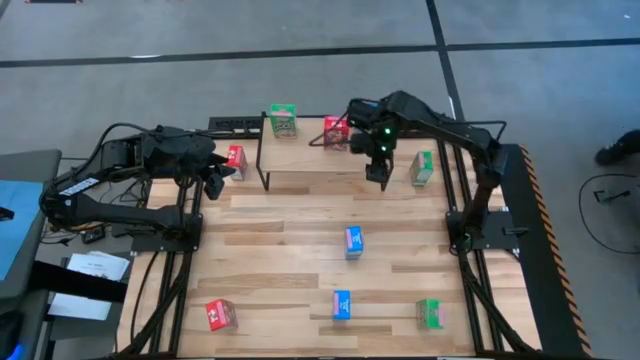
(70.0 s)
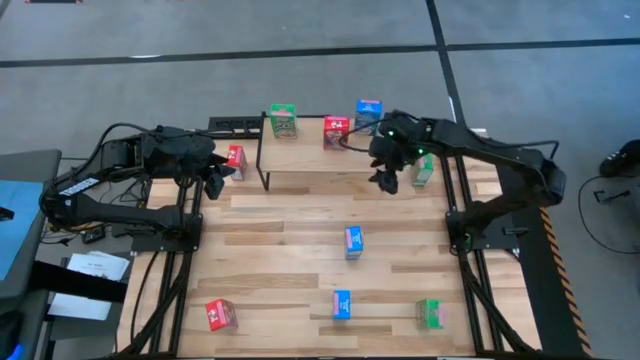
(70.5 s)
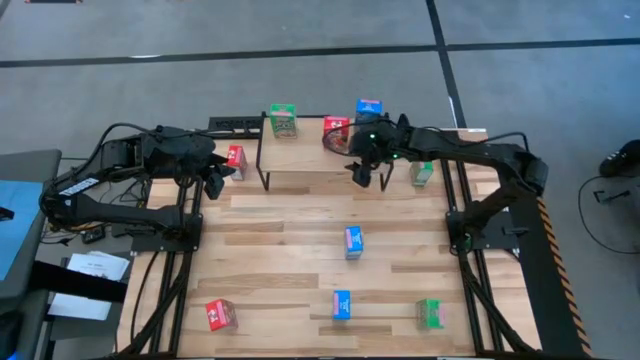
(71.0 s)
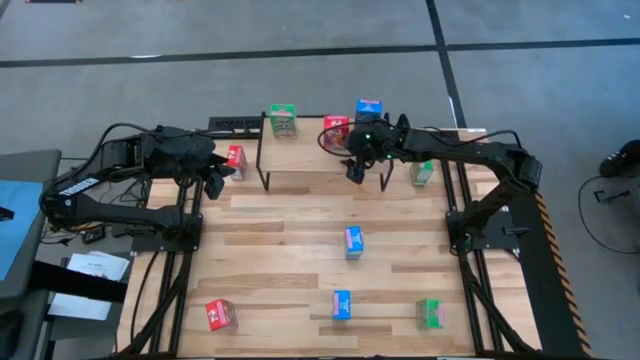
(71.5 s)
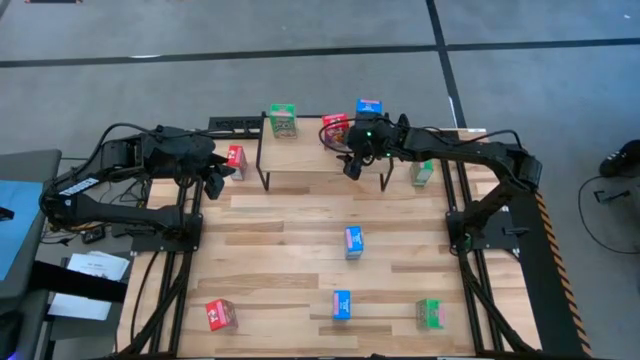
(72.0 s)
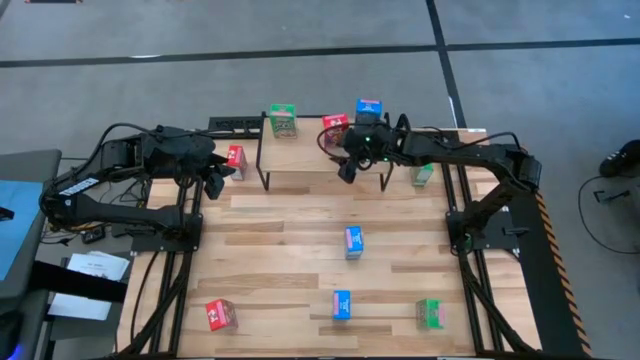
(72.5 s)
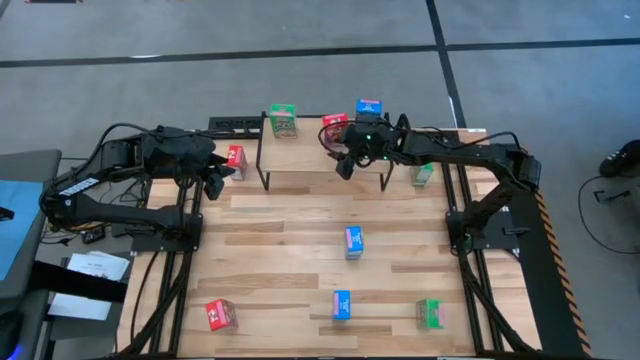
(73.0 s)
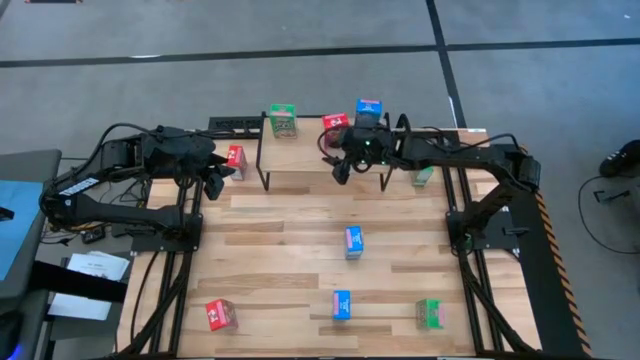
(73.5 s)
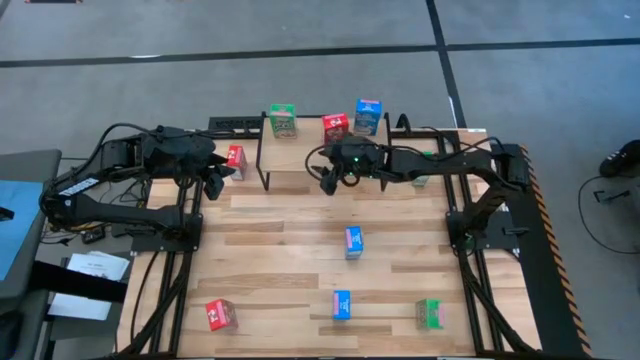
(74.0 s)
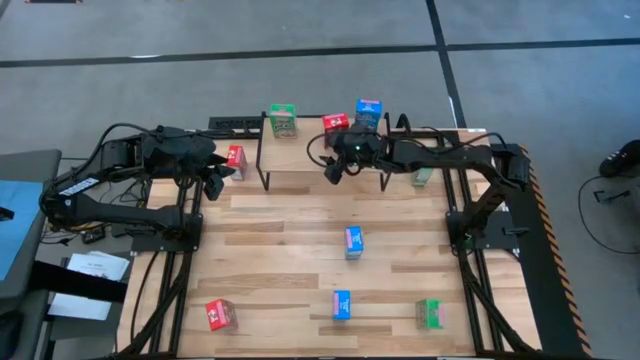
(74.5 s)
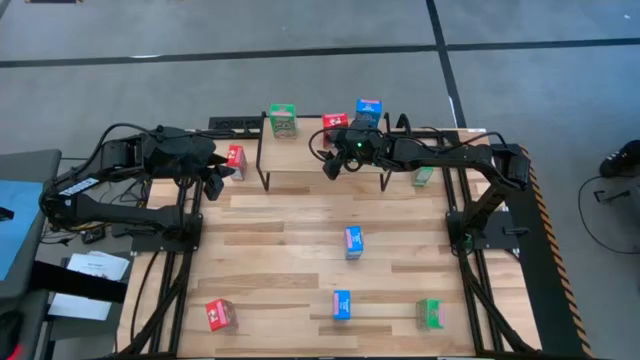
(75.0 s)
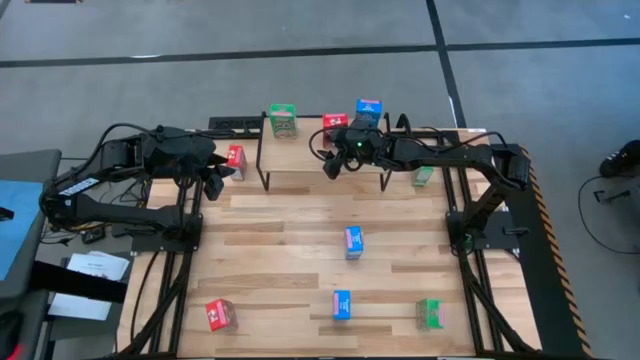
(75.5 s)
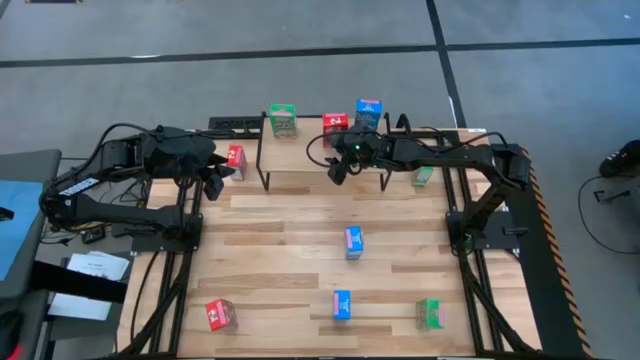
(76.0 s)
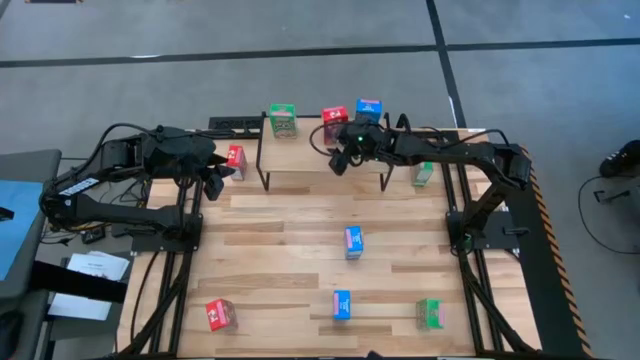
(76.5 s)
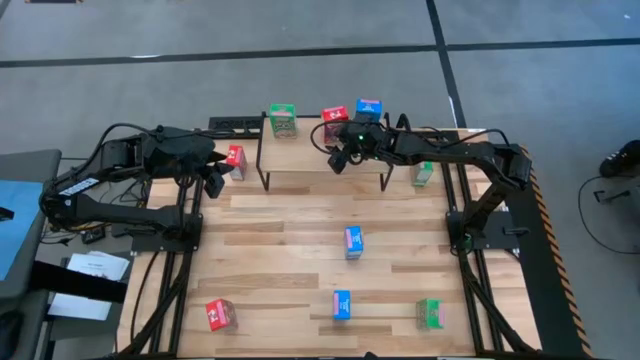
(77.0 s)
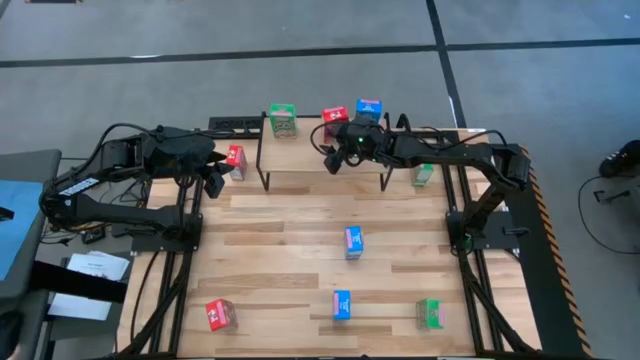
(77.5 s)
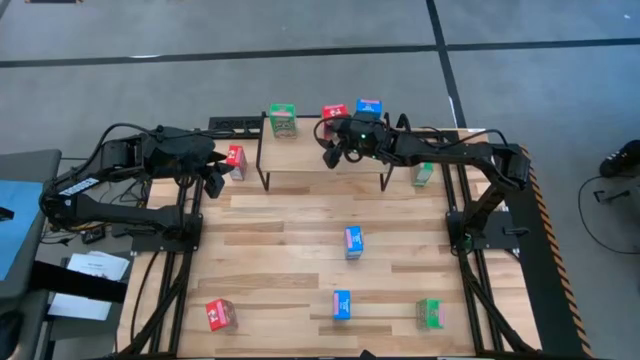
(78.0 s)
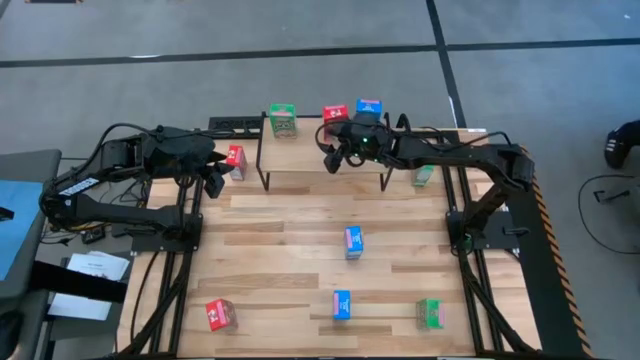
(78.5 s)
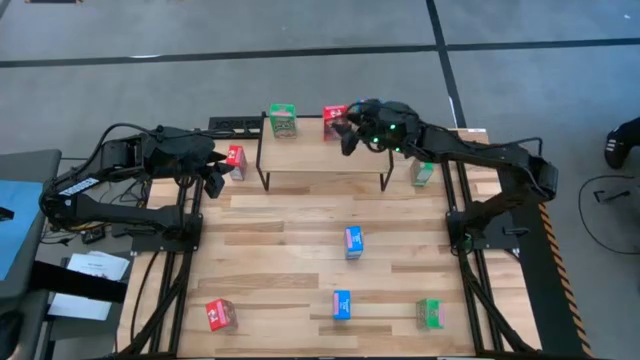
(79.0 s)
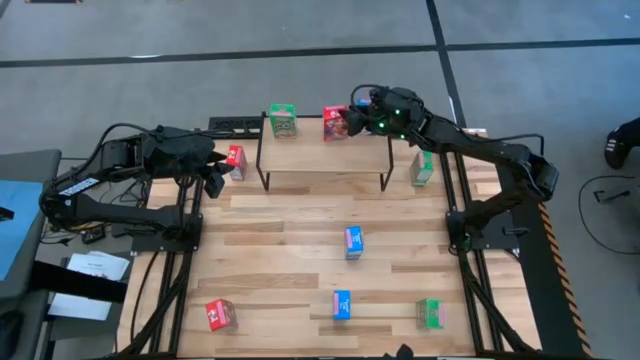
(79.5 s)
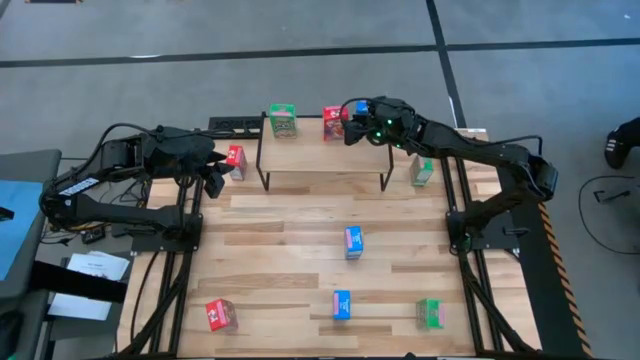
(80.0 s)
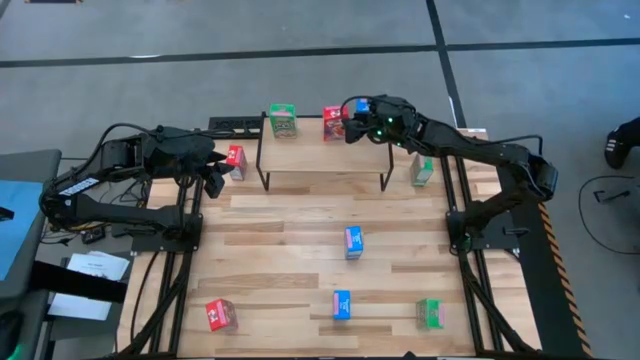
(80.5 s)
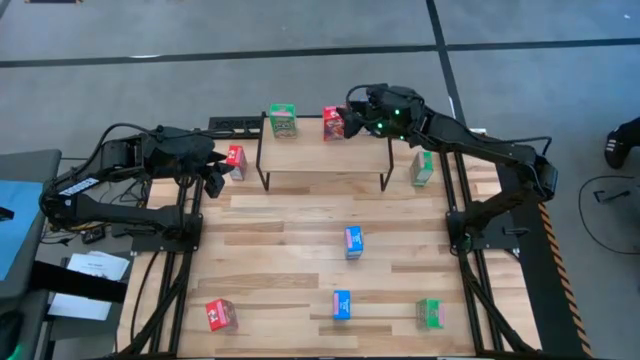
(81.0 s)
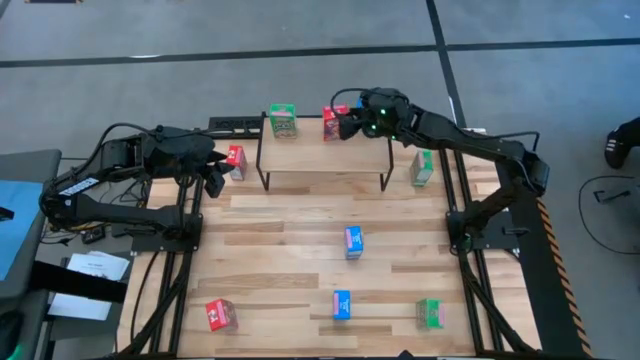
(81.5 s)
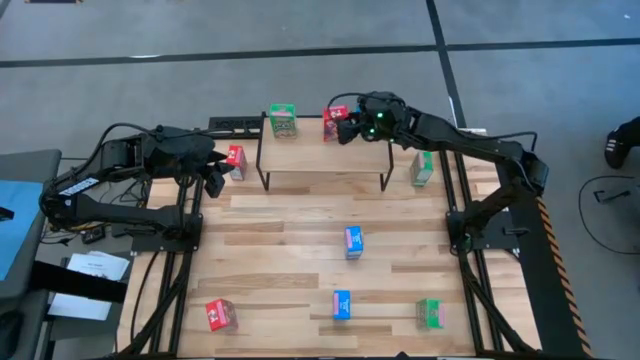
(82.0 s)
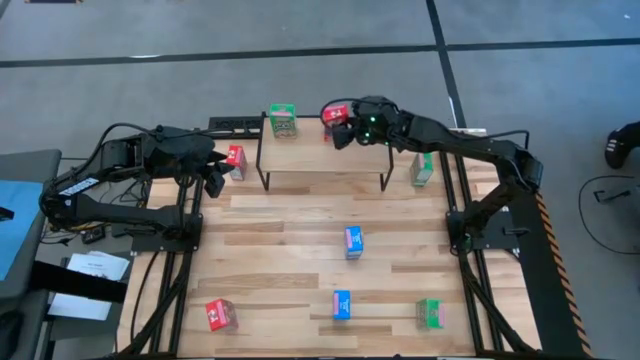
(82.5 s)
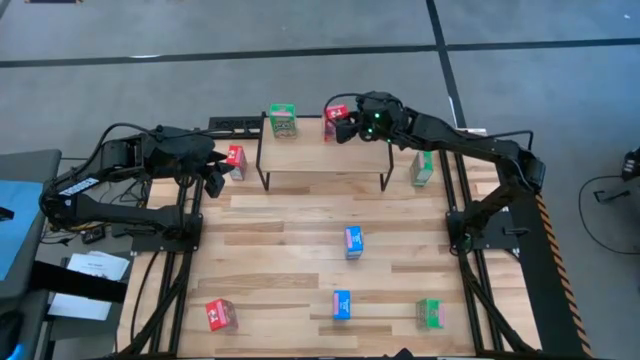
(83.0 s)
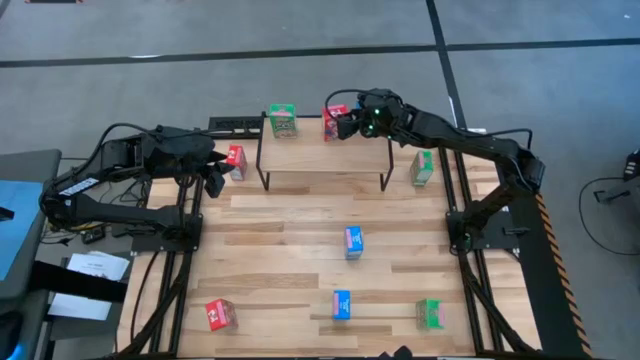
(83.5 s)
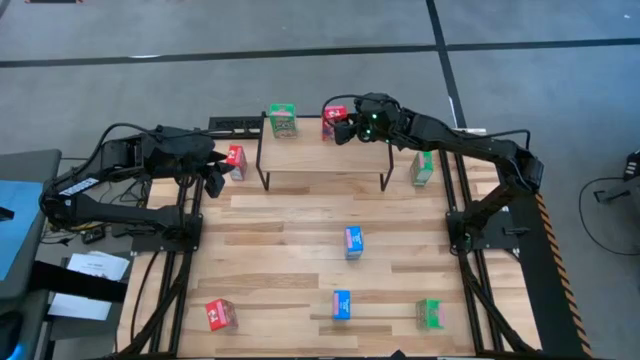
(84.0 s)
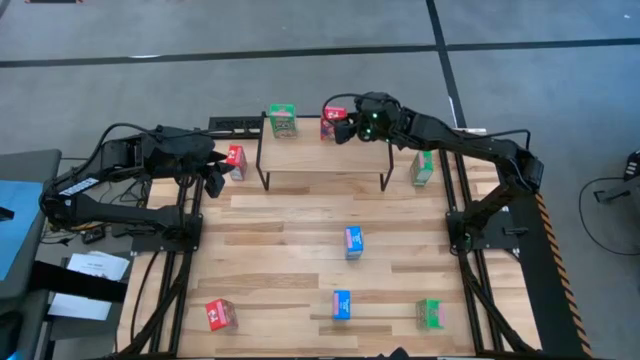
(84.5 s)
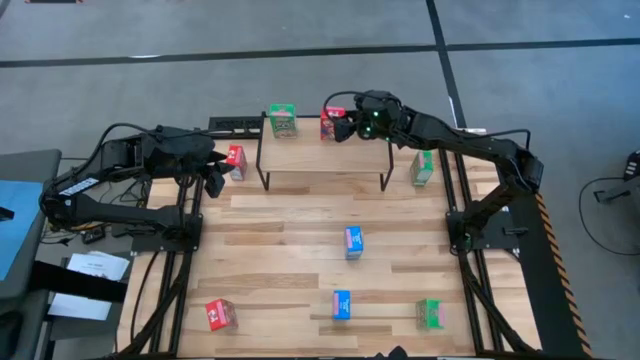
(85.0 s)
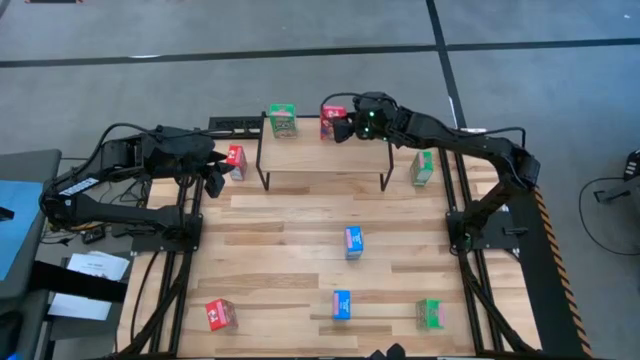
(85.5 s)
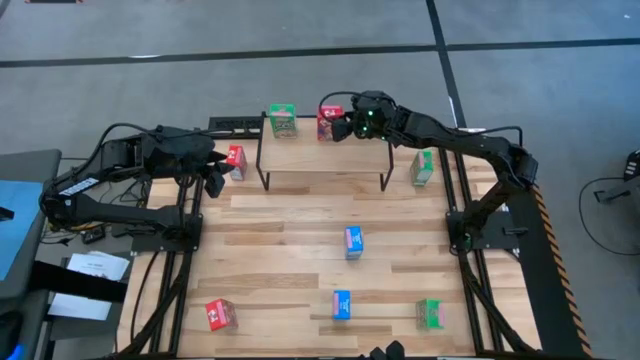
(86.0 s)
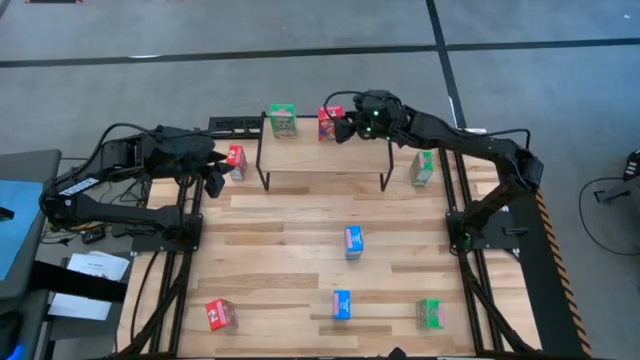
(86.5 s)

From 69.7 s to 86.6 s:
Task: Stack cereal on shelf
Put the middle right red cereal box on the shelf
